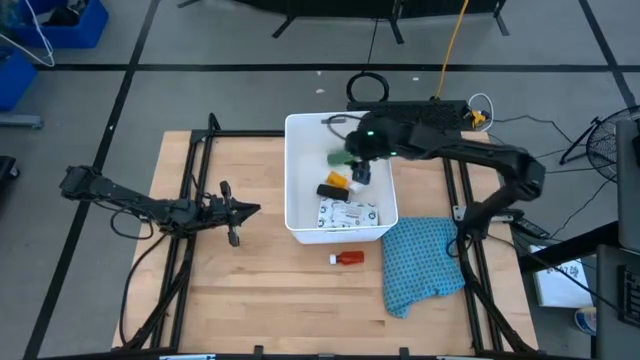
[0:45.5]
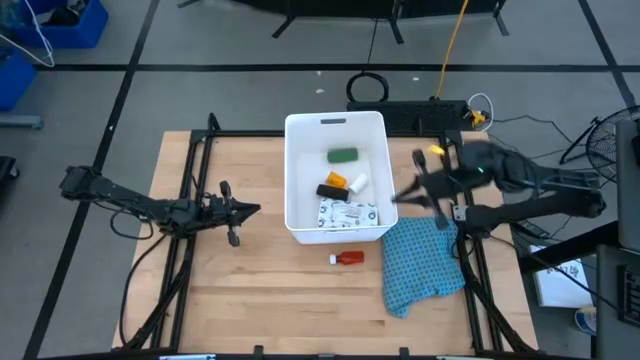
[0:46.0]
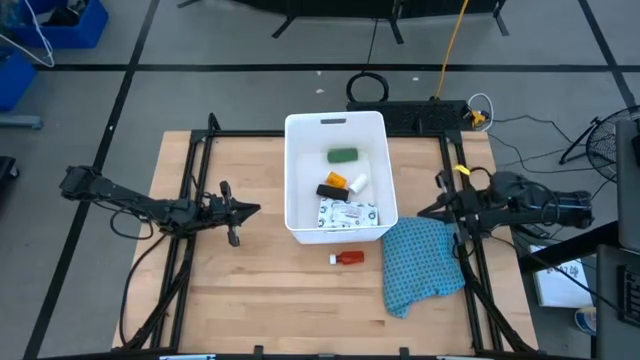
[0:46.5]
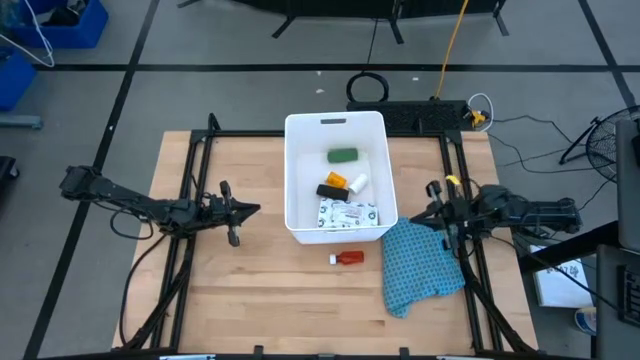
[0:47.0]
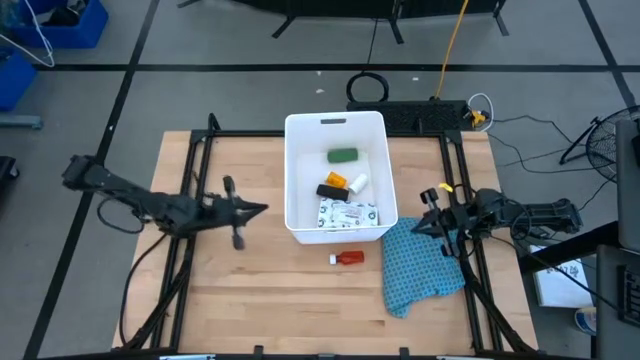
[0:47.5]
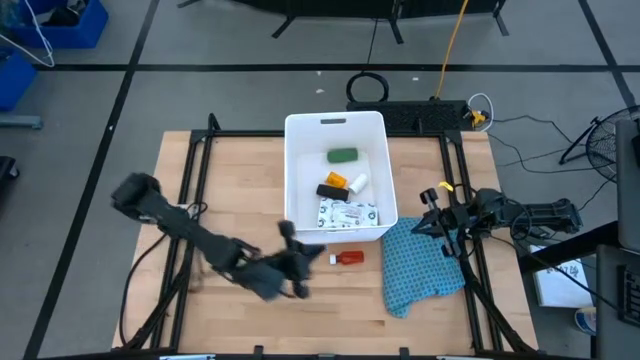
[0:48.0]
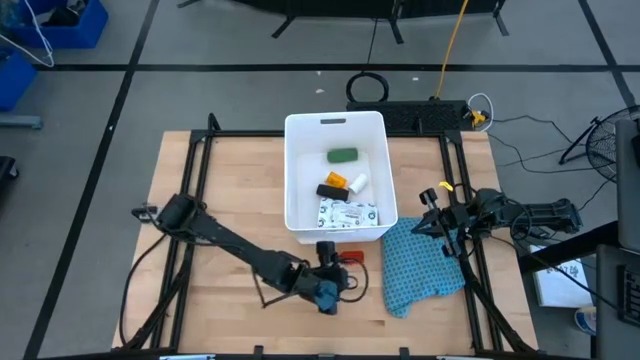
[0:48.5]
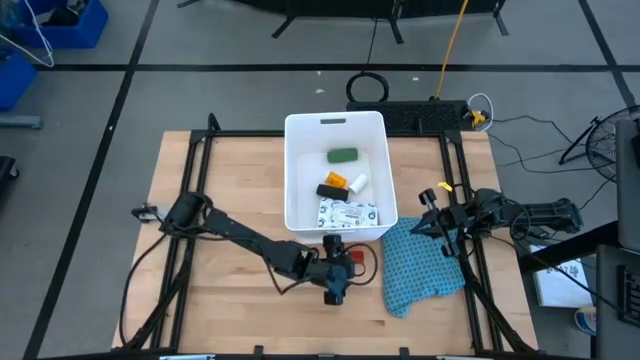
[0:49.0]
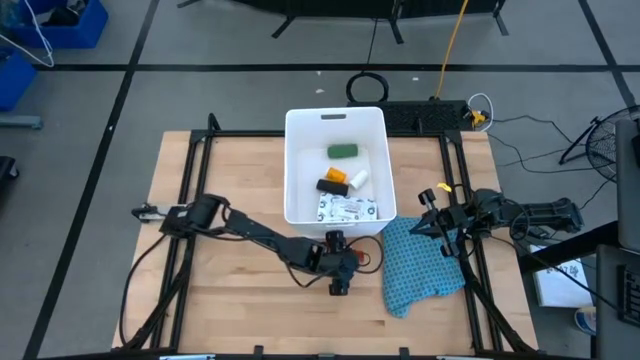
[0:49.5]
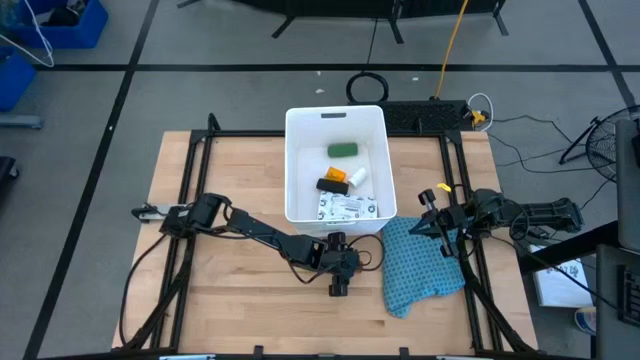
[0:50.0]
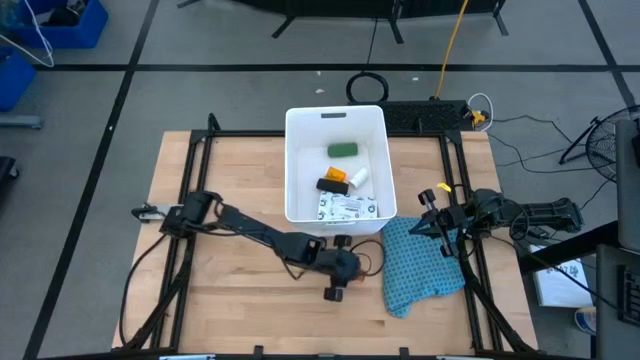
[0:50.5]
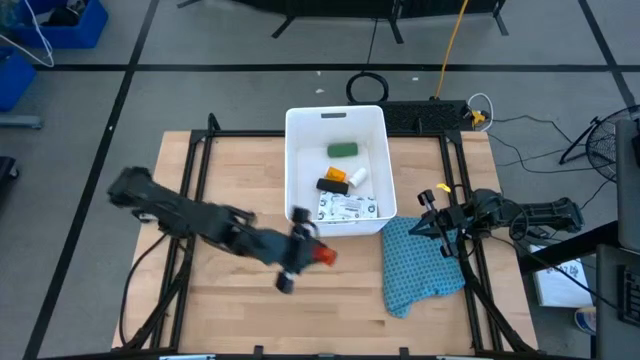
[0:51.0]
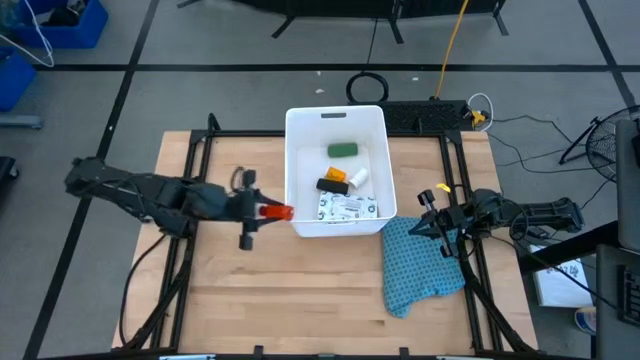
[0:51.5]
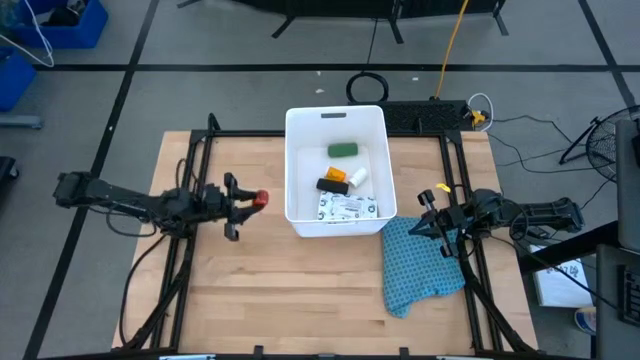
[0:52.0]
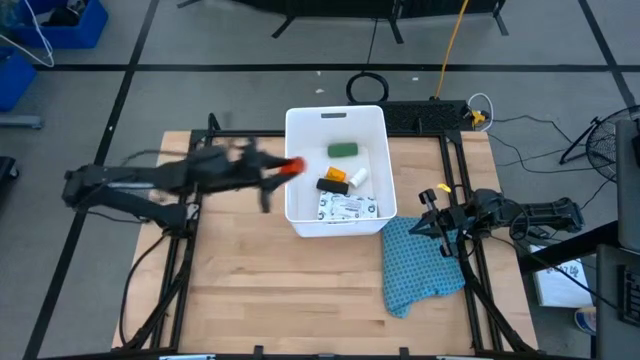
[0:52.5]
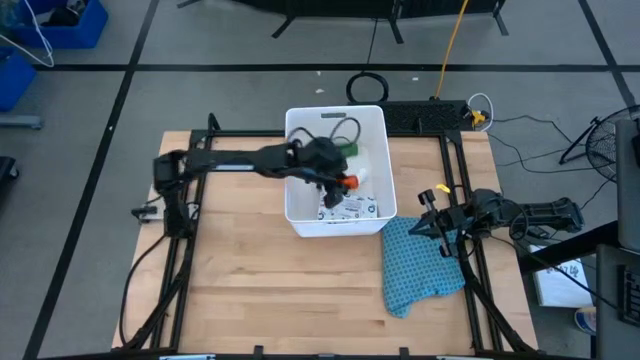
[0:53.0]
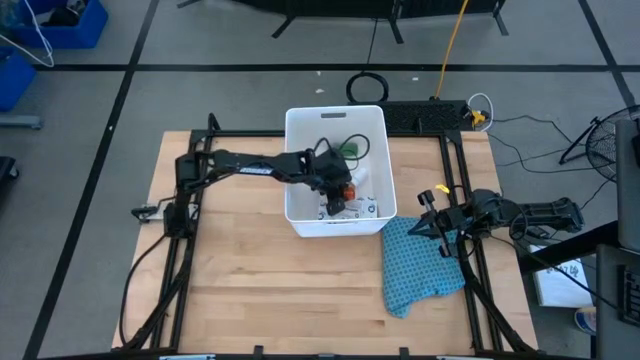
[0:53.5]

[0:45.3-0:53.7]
Task: Pick & place medical supplies in basket/bin
Put the red bottle into the white bin

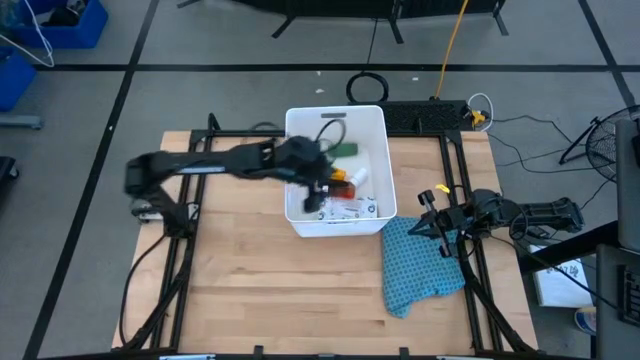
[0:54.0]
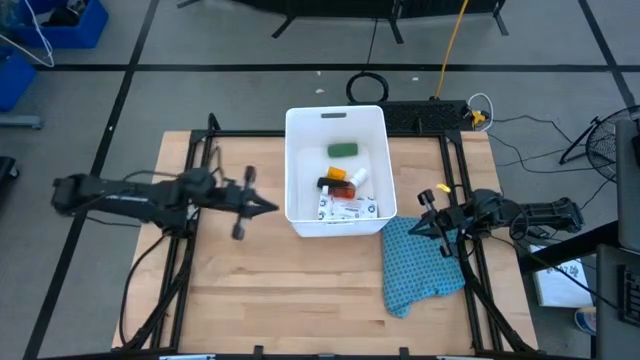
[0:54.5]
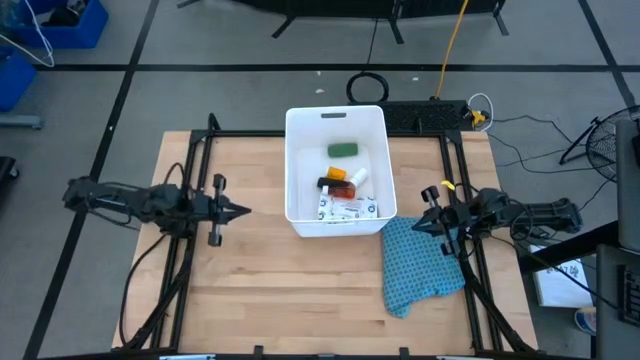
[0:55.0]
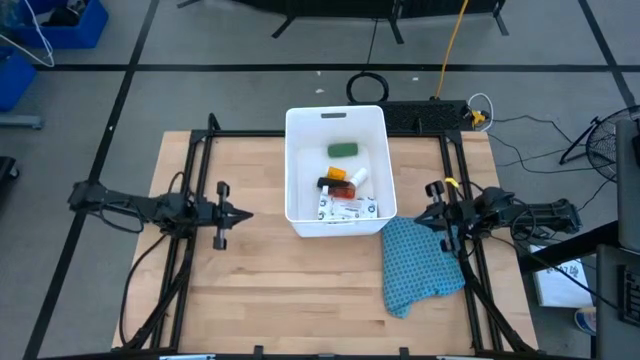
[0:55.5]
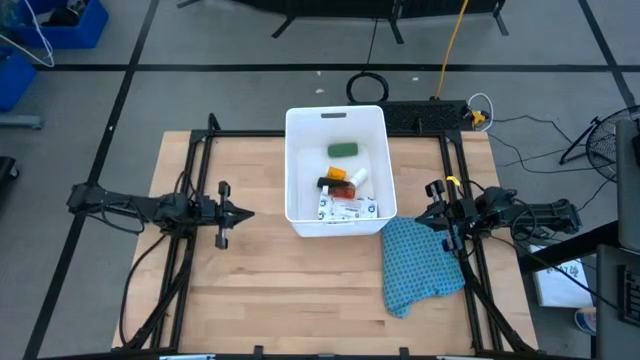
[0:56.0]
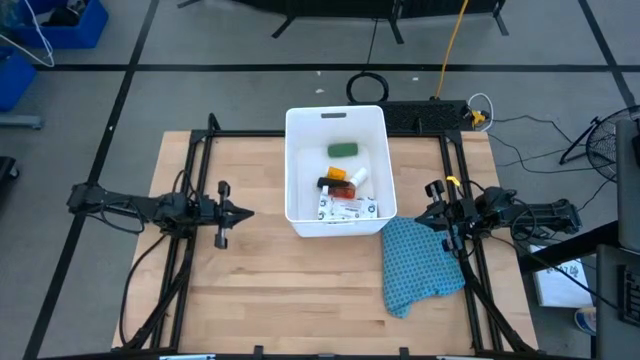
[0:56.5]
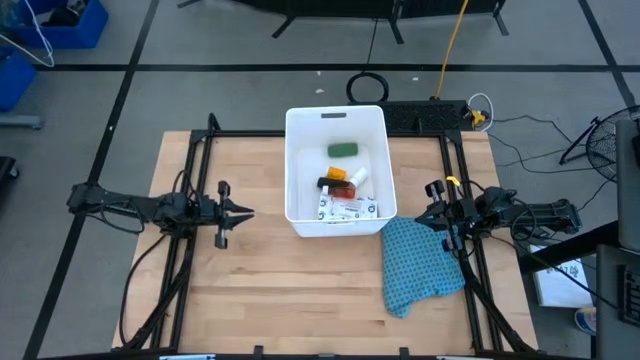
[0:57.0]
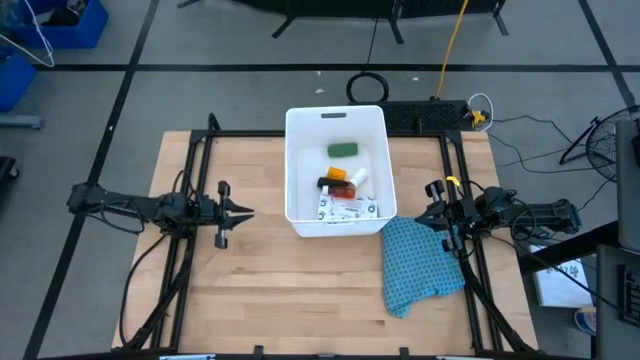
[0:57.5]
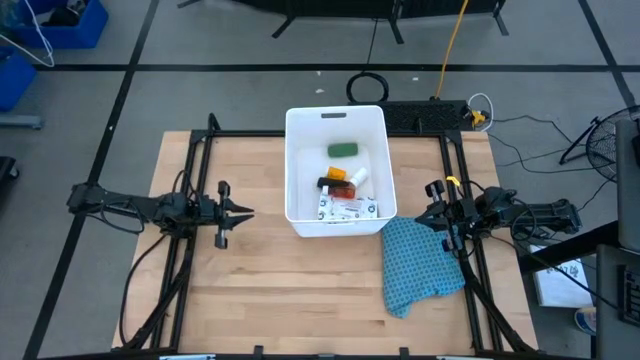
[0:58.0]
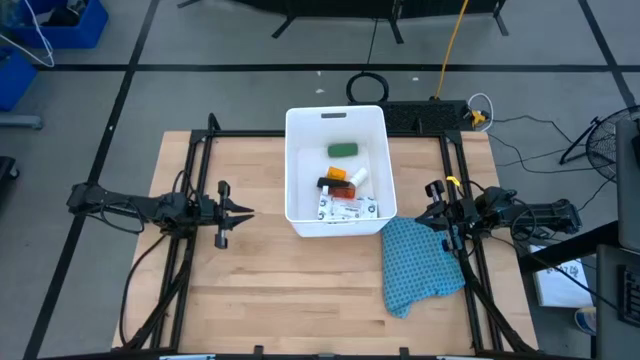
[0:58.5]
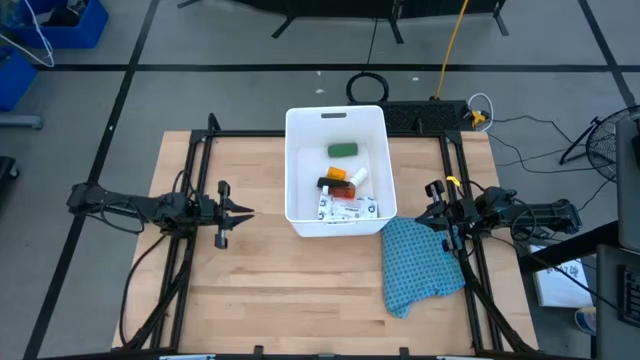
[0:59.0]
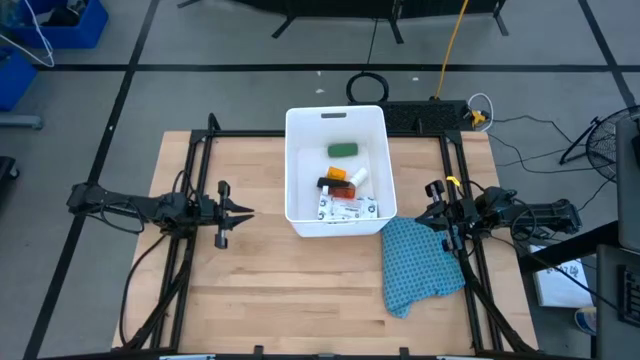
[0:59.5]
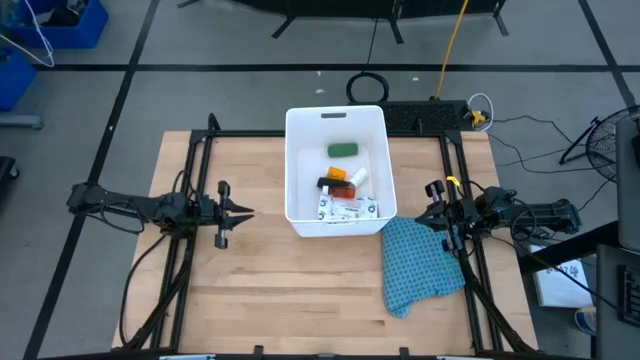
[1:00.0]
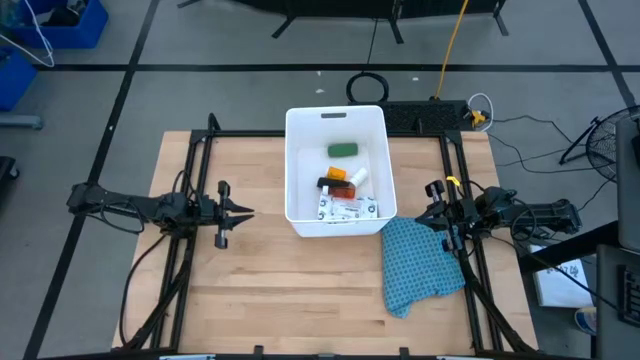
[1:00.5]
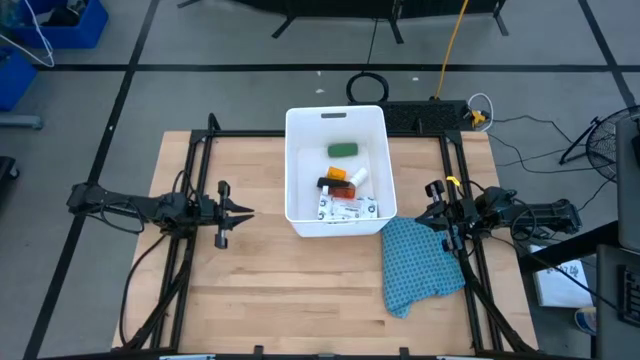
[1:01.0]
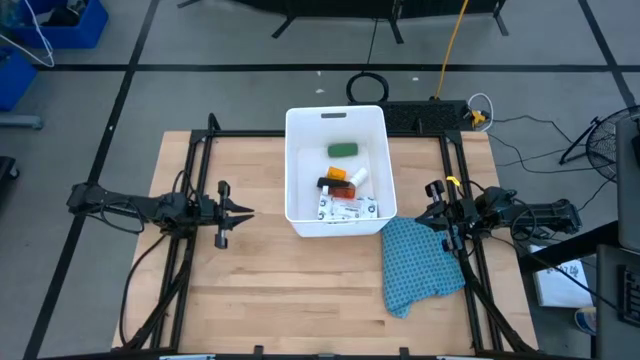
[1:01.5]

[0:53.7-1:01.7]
Return to Home Position

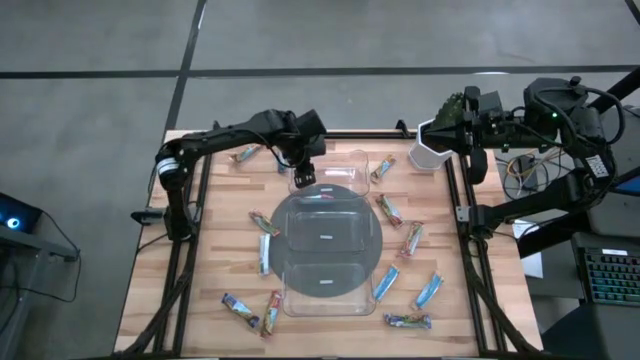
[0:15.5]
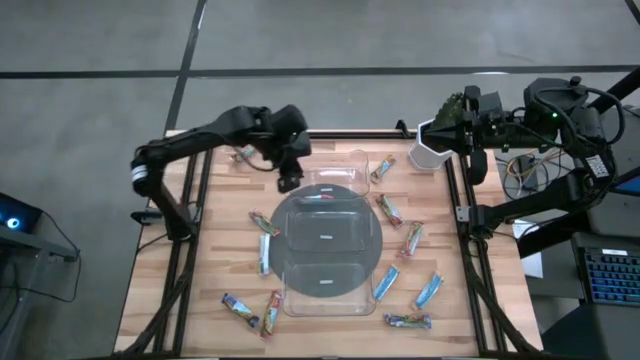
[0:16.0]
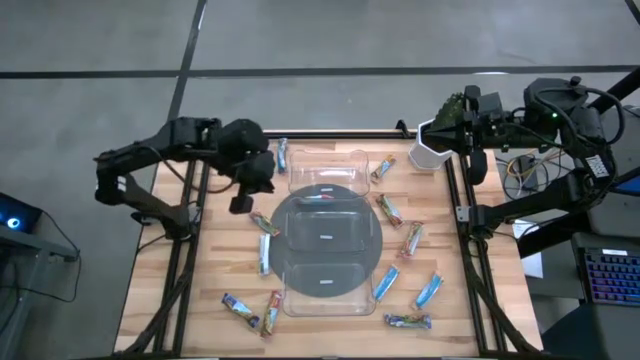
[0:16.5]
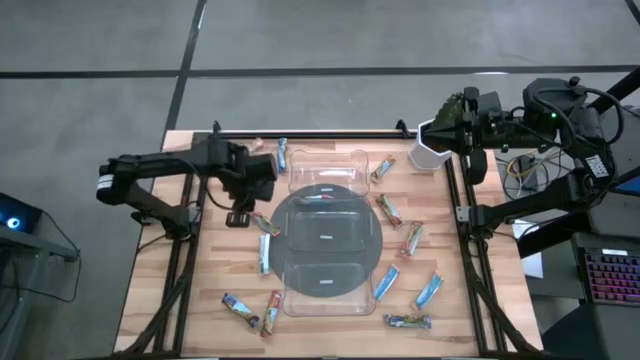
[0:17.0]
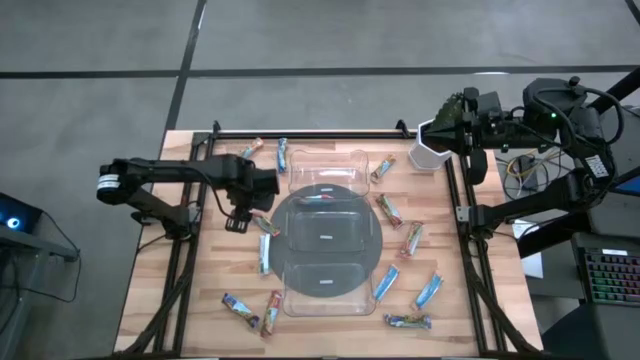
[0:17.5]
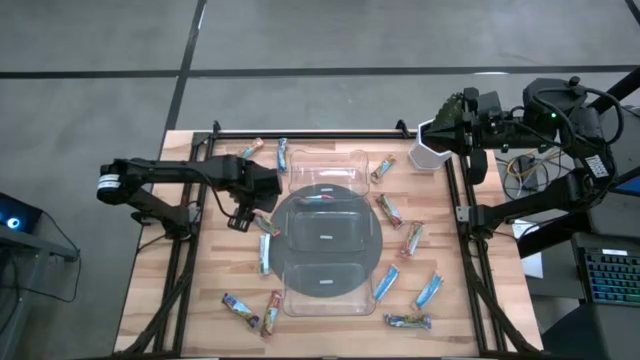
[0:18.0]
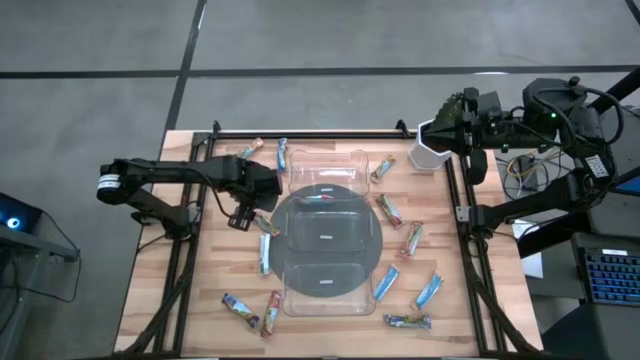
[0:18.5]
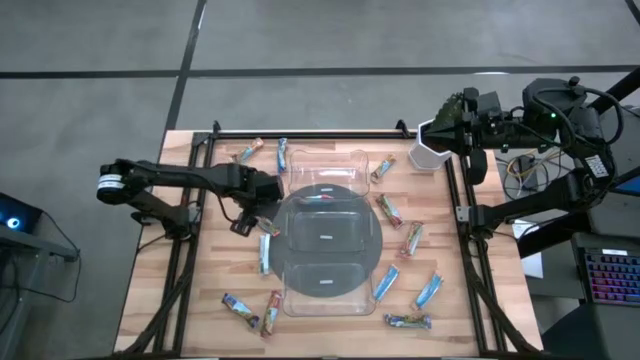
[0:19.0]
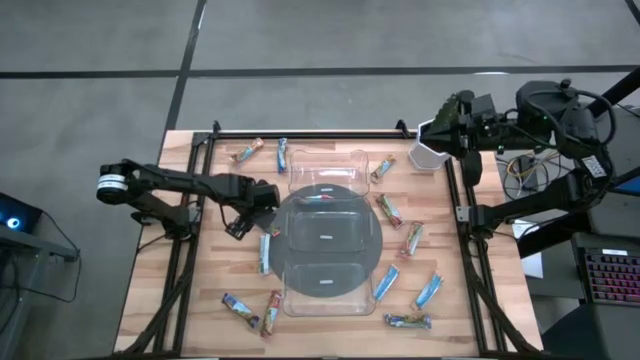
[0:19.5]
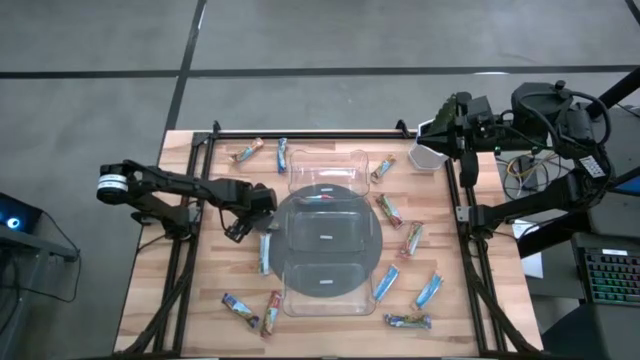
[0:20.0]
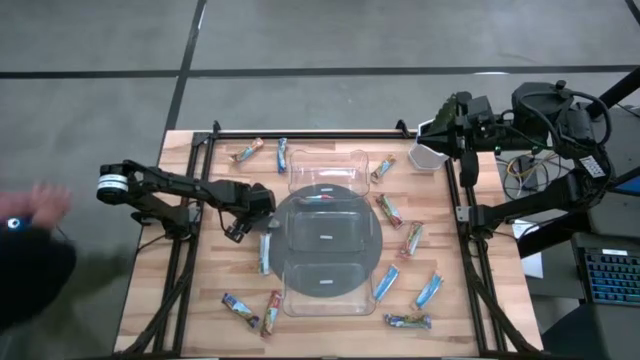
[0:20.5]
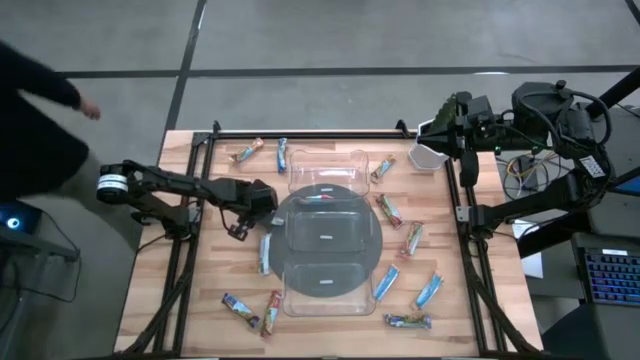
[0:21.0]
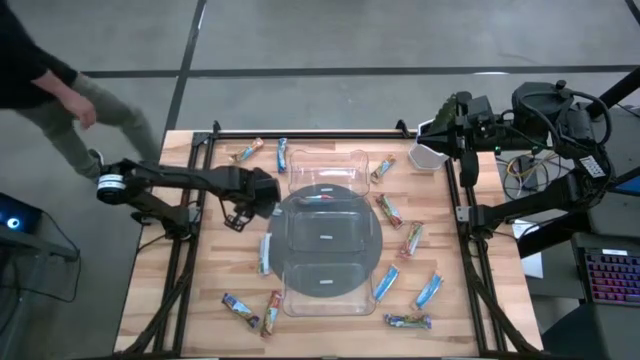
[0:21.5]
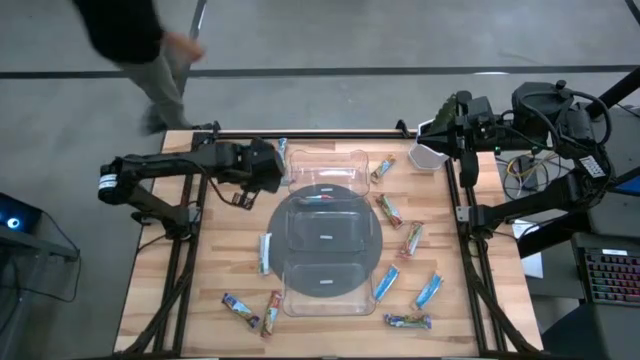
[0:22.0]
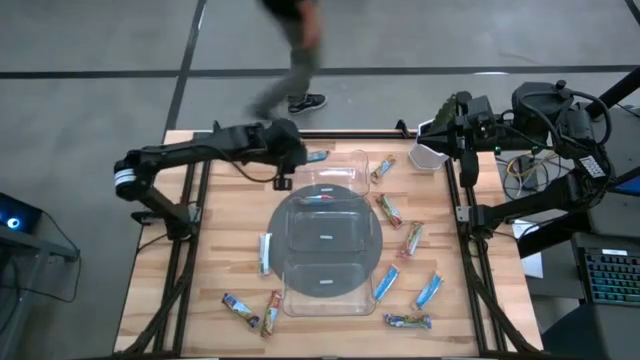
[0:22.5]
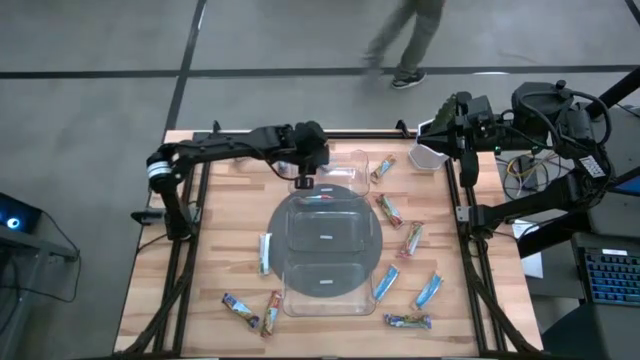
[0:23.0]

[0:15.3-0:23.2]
Task: Pick and place Granola Bars by type
Put the red granola bar into the top transparent bin
